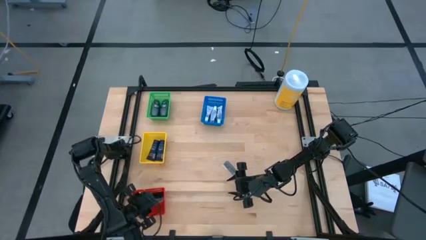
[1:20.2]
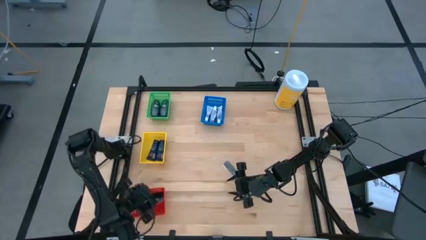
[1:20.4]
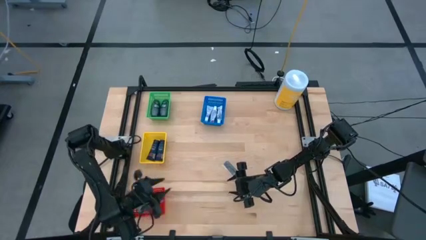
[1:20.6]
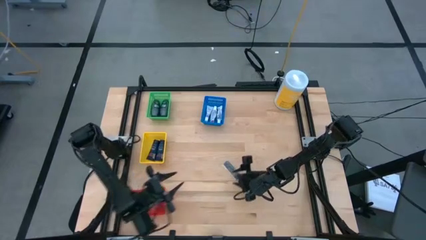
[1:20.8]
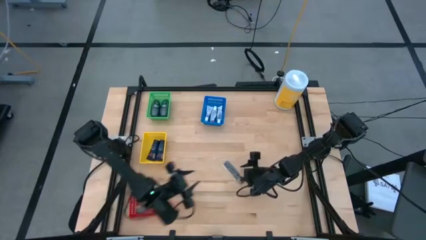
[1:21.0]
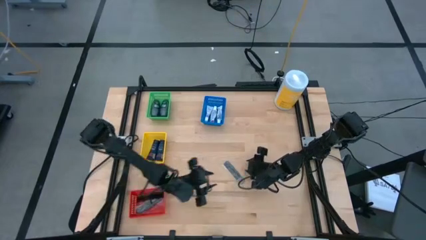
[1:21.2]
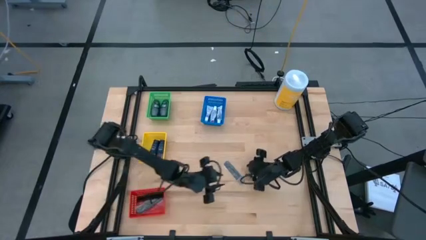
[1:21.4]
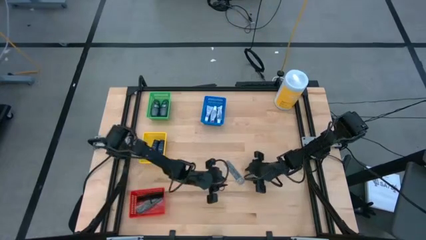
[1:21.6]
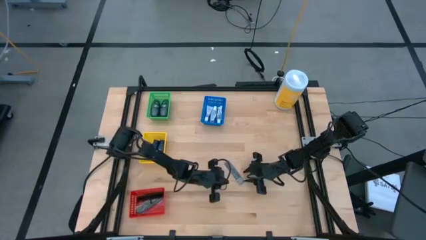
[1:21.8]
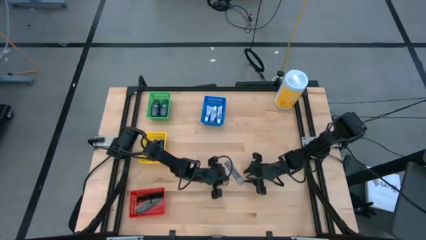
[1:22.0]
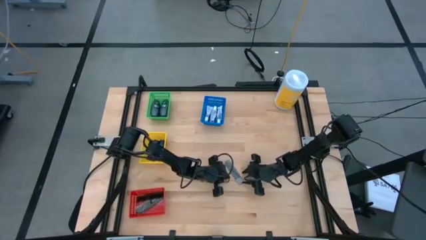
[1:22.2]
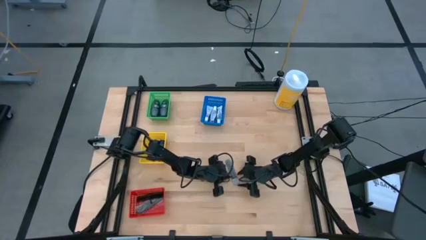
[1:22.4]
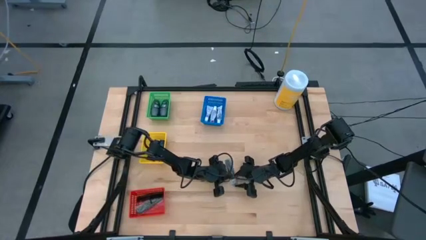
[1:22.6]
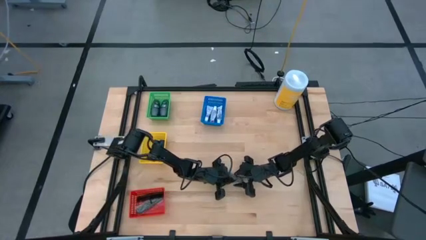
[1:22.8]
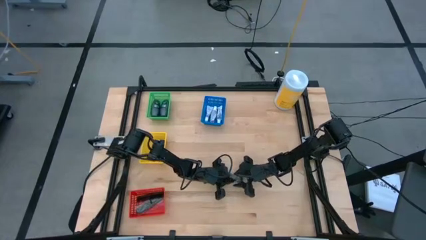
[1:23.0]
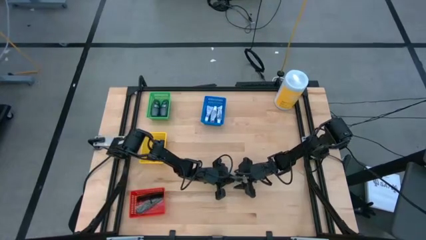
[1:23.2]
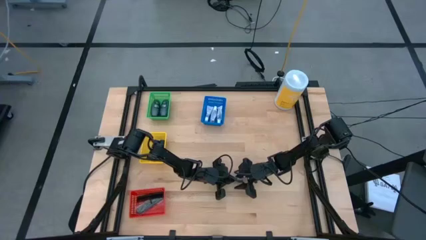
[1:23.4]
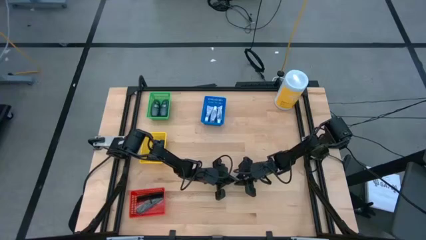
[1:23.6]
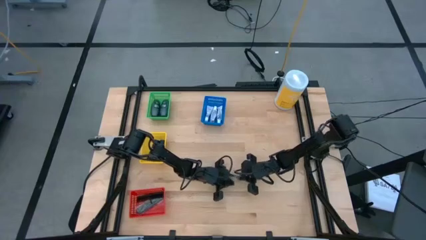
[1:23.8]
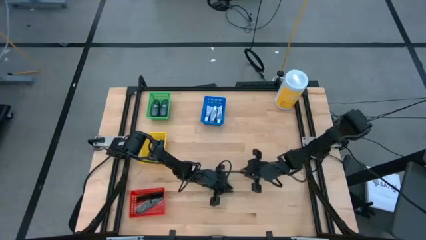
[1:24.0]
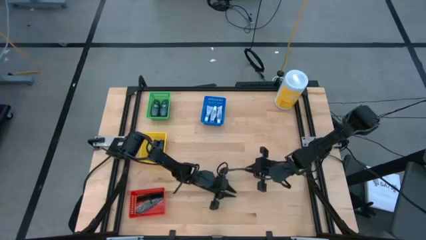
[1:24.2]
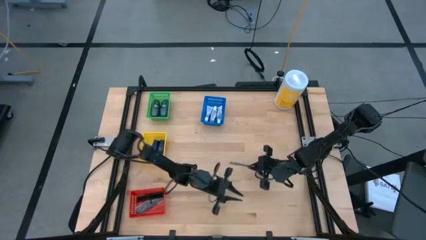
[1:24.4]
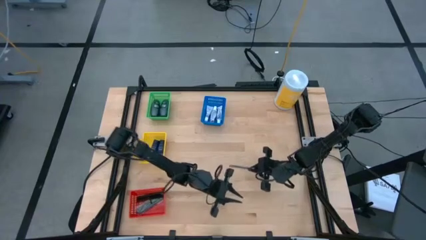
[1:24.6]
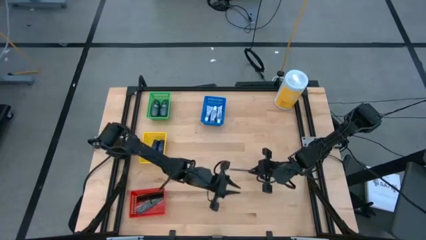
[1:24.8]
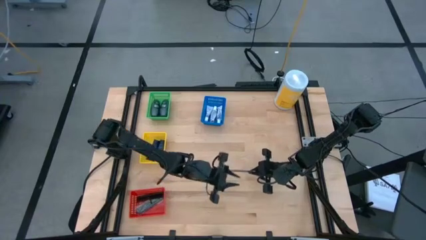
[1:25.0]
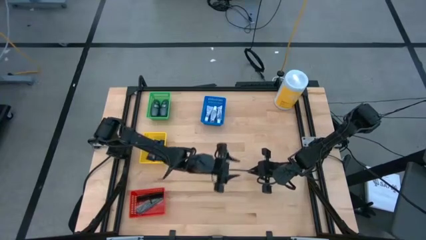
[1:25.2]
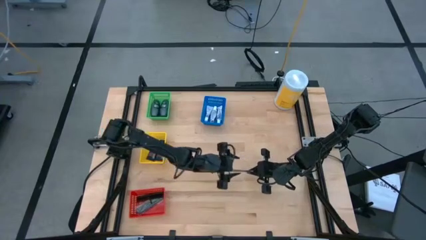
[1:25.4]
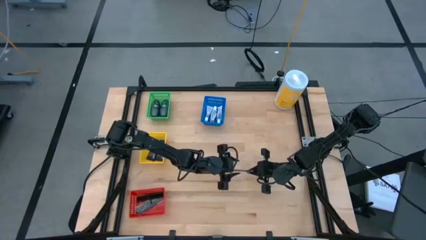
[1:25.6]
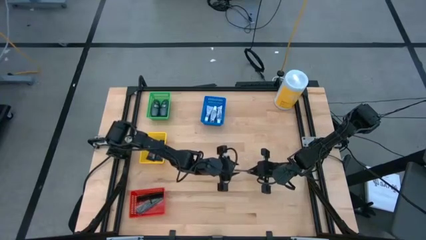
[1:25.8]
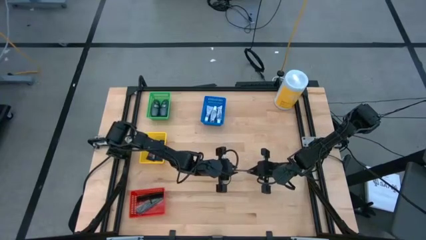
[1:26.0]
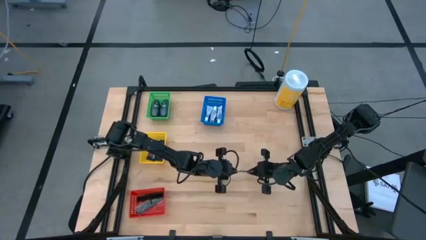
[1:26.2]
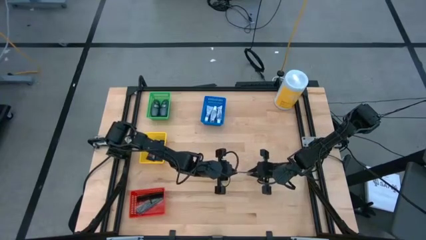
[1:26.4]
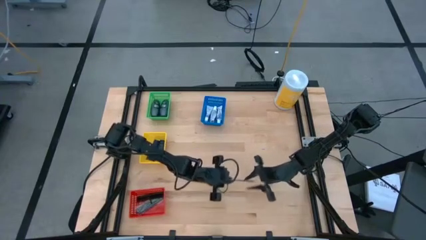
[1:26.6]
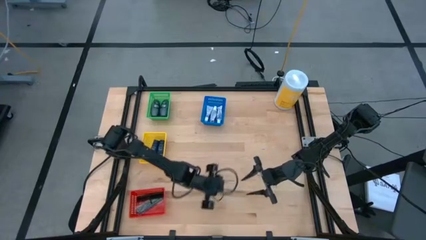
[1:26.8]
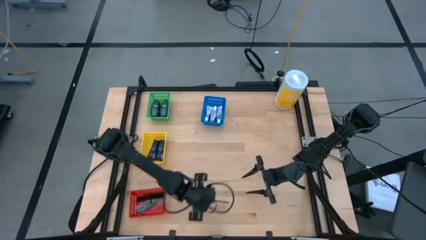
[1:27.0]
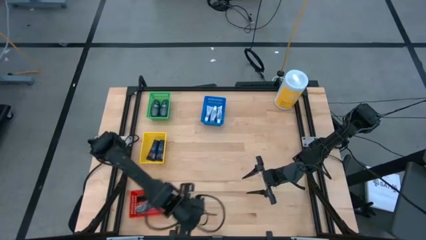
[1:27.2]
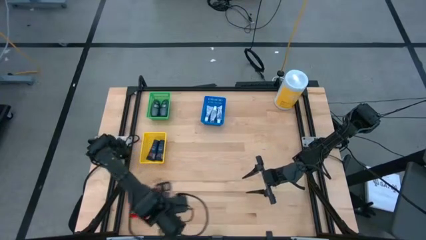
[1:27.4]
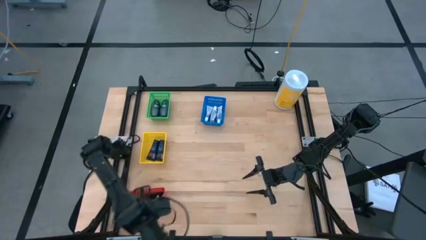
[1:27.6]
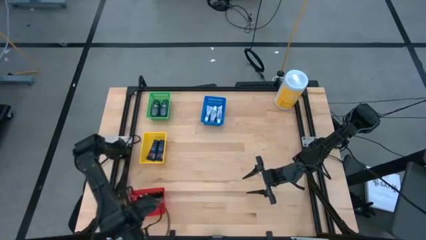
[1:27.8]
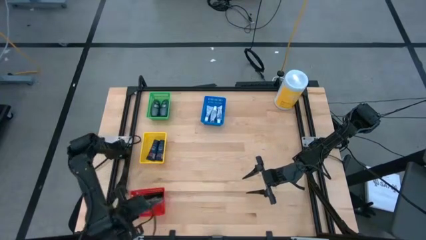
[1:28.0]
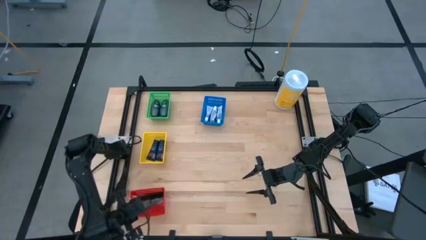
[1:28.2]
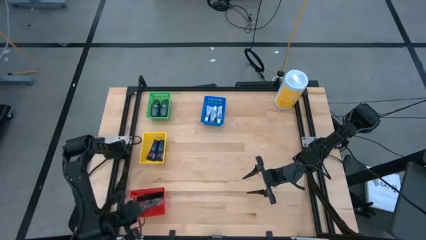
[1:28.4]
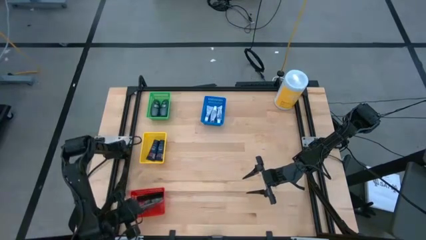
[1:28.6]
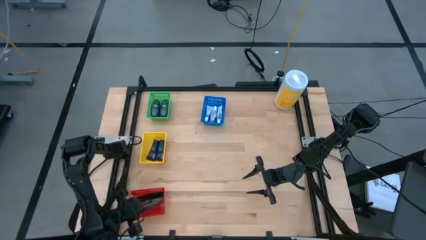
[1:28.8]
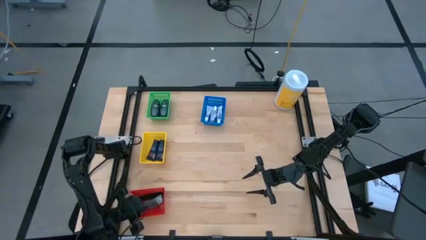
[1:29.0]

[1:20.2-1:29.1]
Task: Pick & Place Travel size toiletries
Put the black comb in the red basket

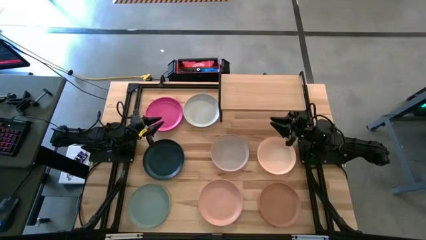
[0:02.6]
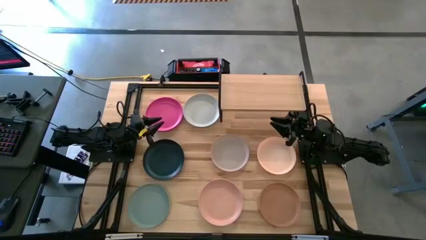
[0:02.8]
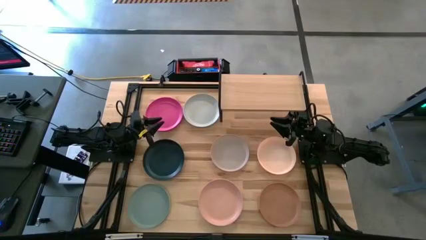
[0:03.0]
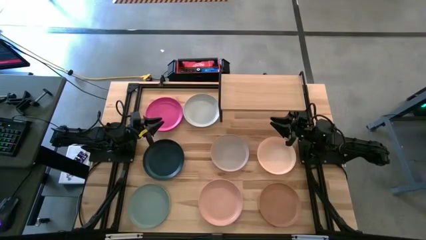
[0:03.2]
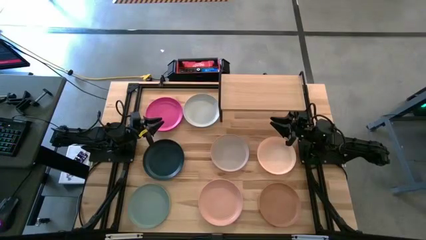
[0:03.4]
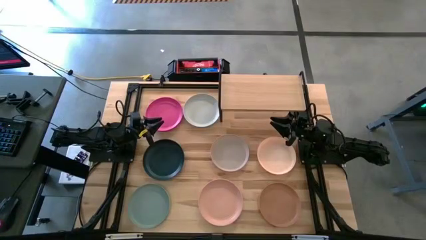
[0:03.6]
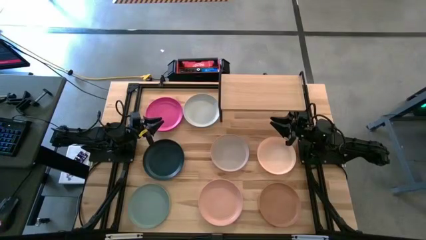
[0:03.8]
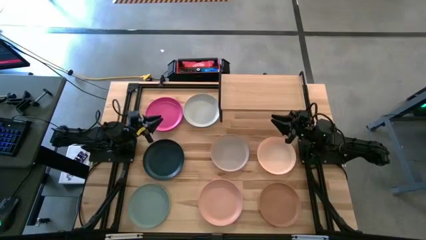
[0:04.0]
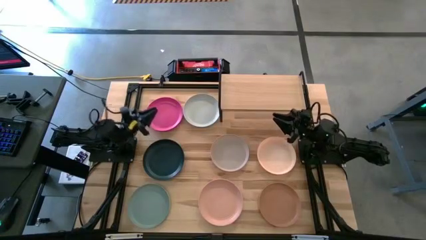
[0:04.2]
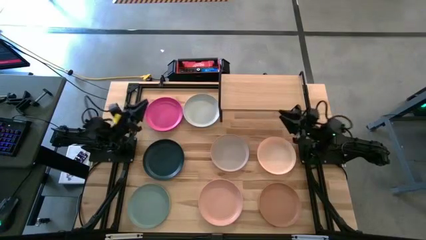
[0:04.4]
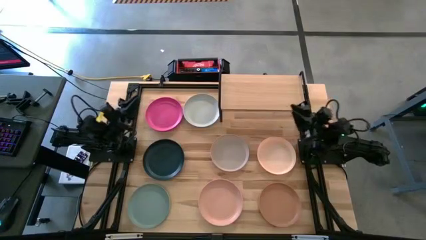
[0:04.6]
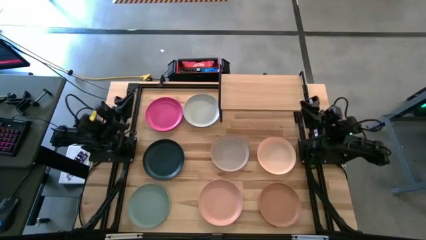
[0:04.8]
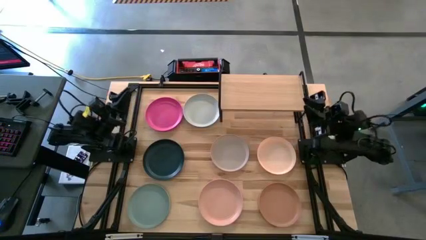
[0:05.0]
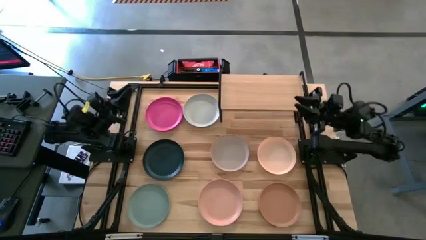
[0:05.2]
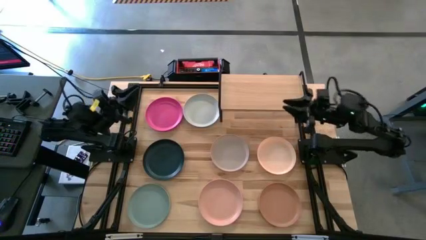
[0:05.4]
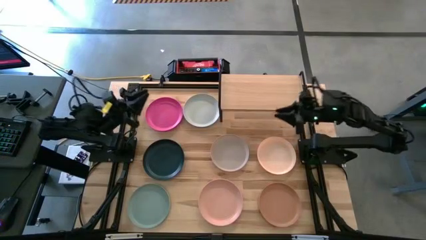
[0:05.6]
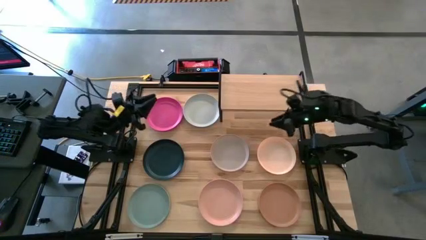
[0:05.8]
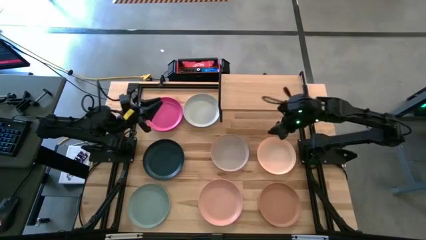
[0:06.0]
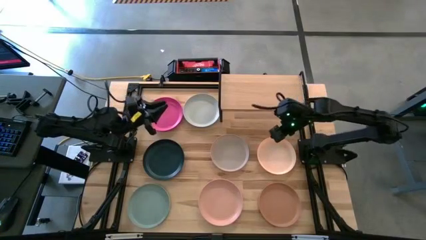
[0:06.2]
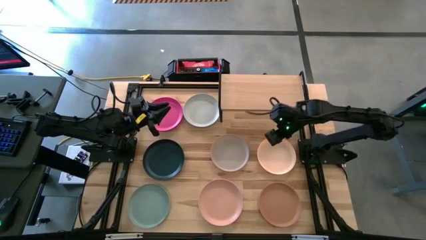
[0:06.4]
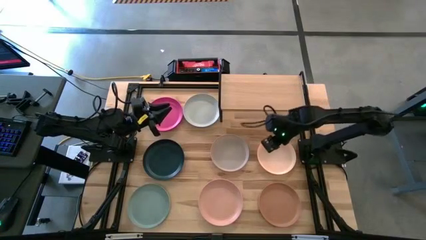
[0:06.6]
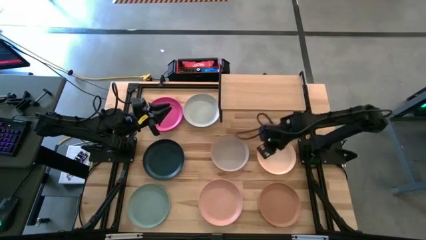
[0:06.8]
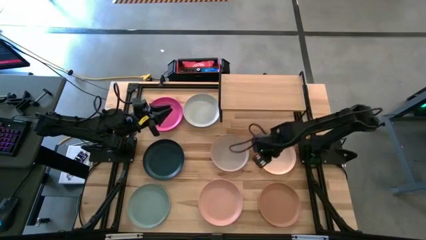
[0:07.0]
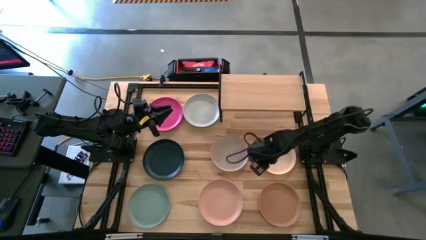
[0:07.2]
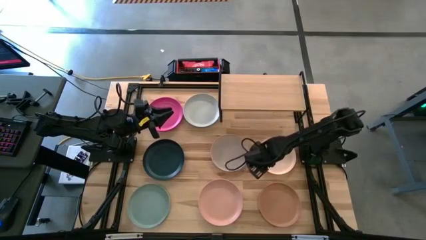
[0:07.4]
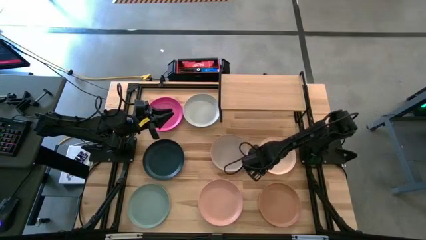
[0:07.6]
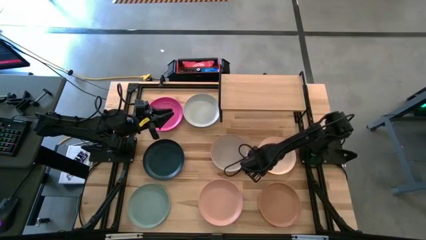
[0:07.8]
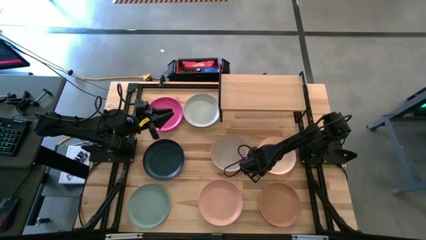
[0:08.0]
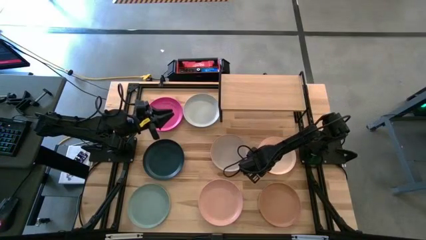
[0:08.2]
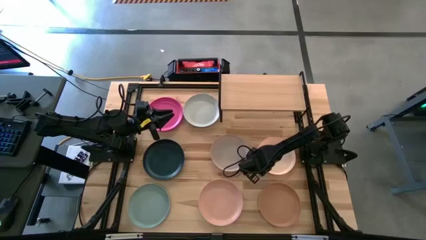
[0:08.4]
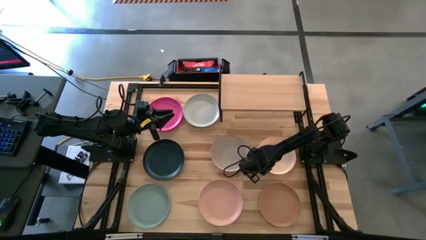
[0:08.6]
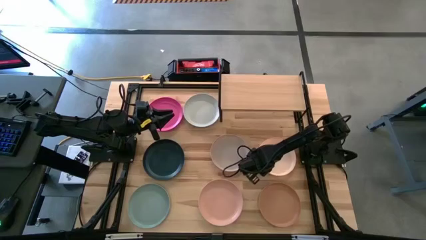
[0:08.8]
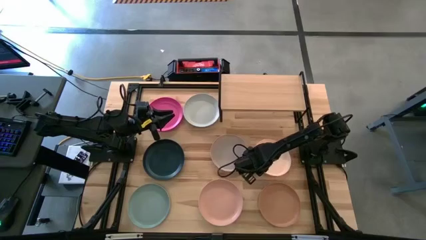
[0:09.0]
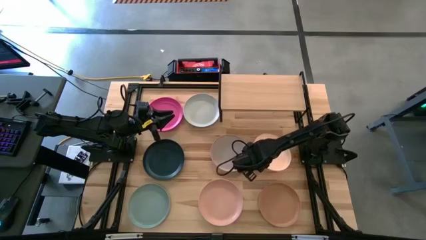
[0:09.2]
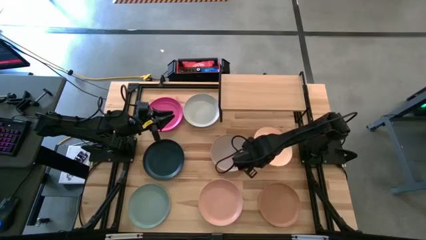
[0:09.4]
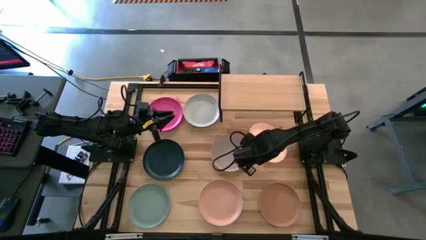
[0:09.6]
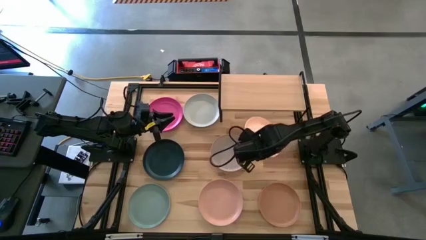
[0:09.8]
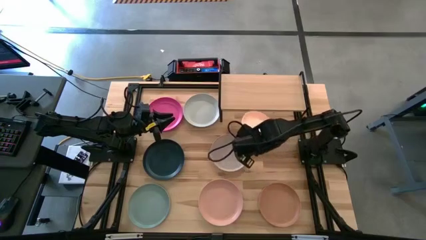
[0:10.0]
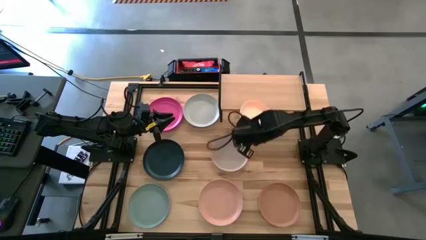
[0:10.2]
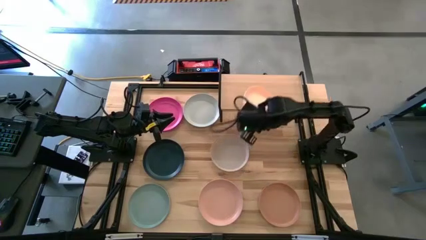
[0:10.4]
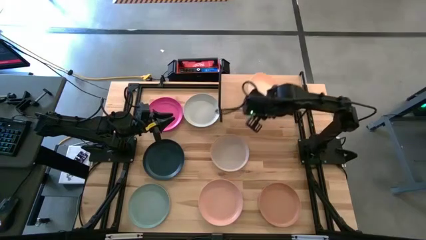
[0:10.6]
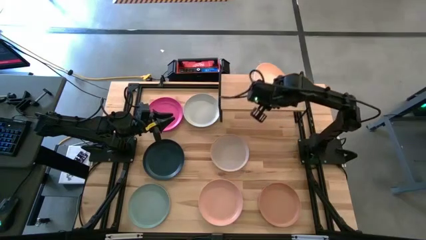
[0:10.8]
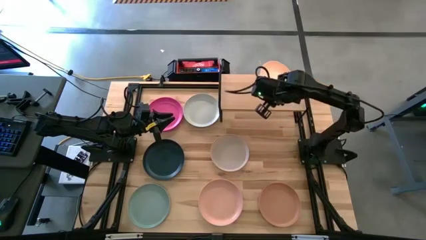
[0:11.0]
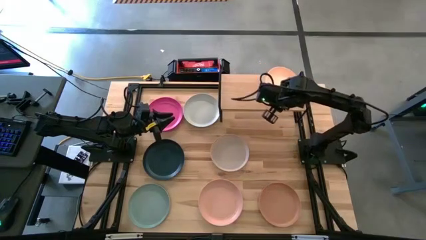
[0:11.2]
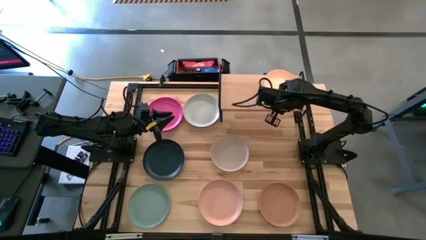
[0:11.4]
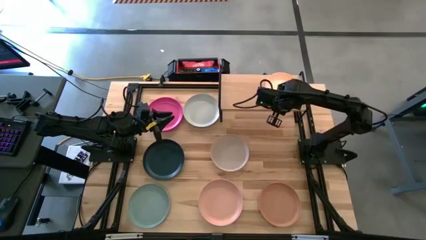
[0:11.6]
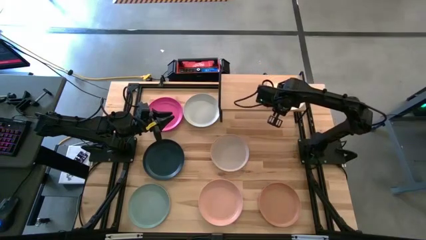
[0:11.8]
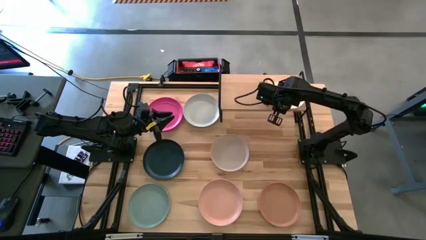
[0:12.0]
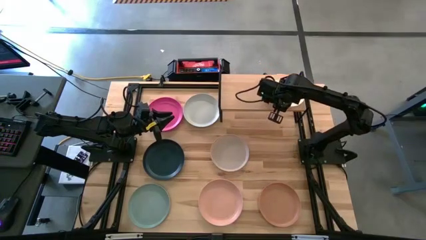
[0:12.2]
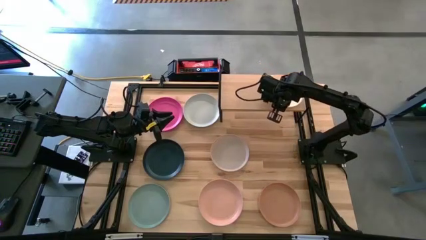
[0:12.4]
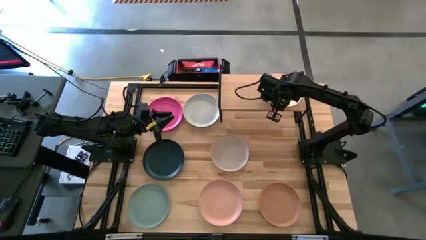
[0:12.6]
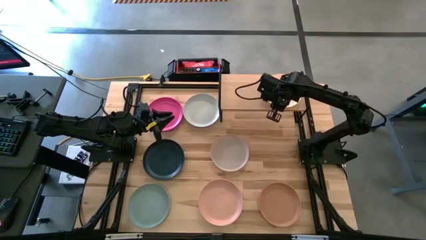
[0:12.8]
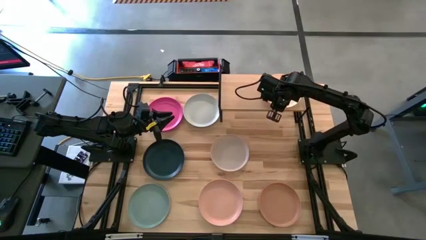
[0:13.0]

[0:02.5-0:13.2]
Task: Place and stack plates onto a shelf
Put the light brown plate on the shelf
